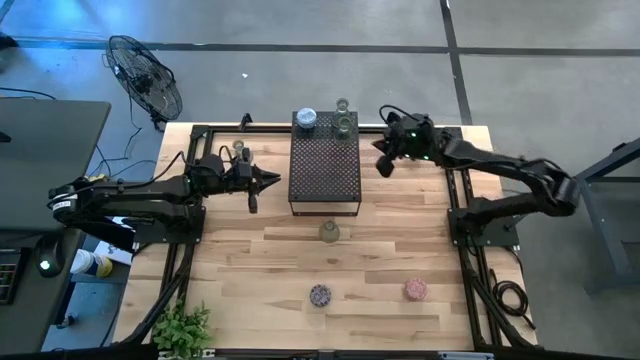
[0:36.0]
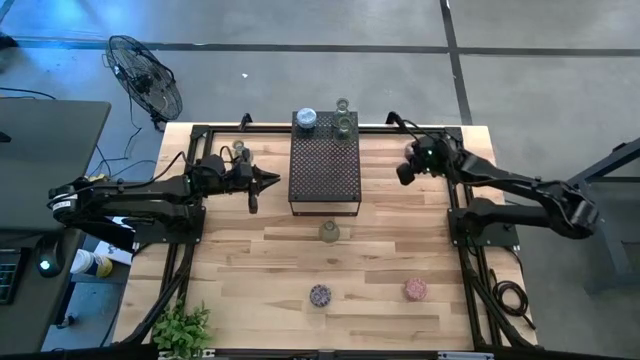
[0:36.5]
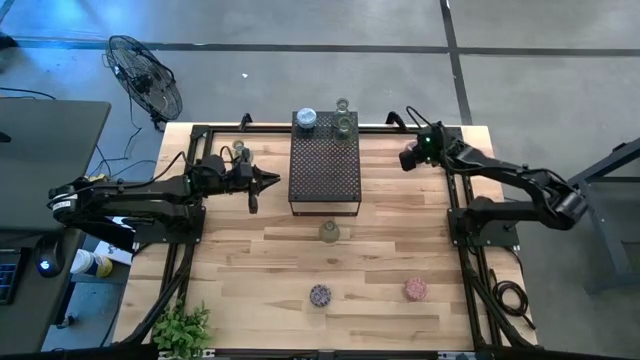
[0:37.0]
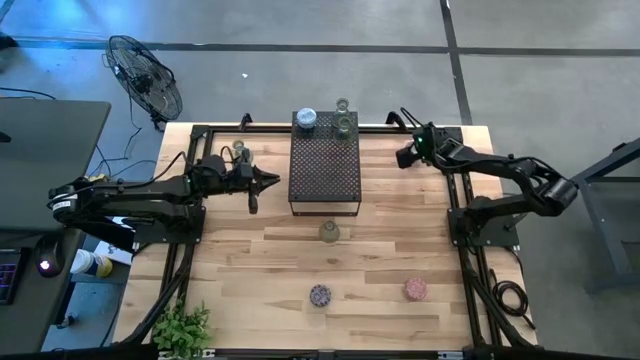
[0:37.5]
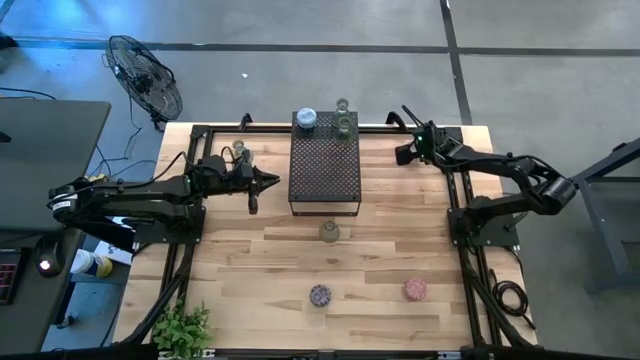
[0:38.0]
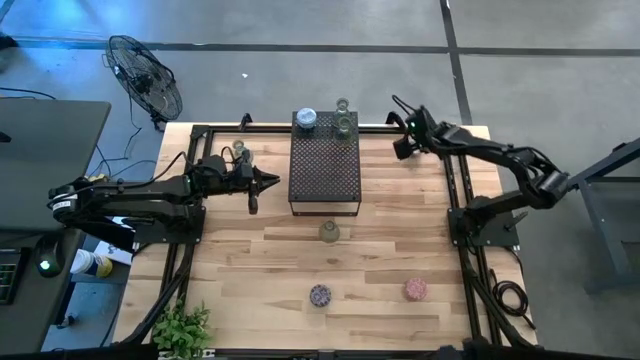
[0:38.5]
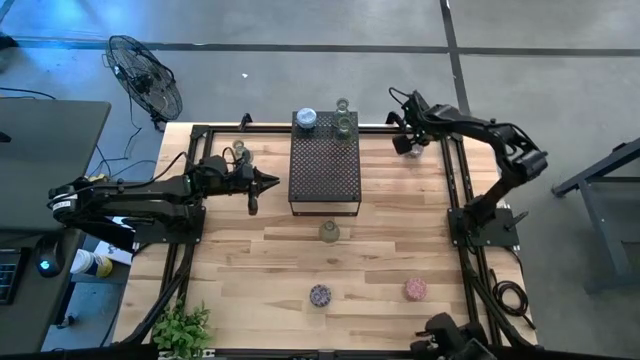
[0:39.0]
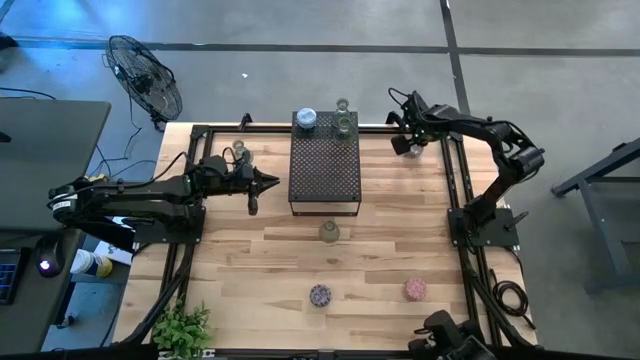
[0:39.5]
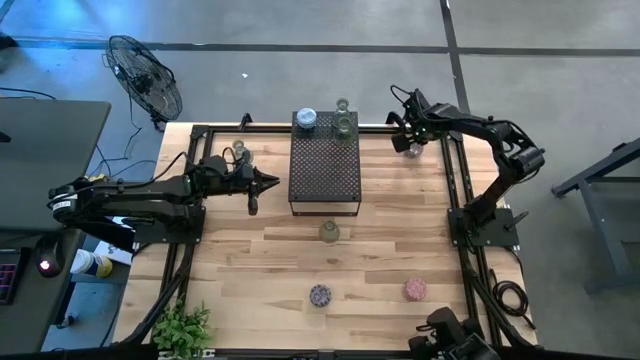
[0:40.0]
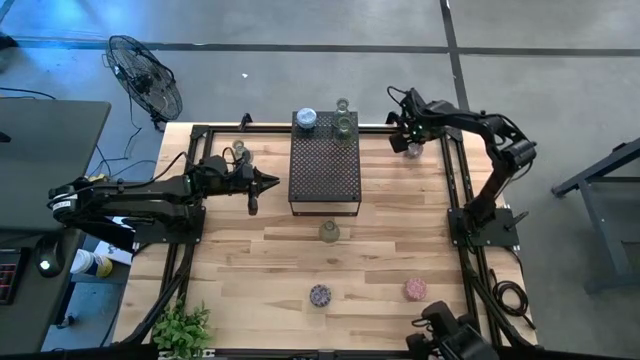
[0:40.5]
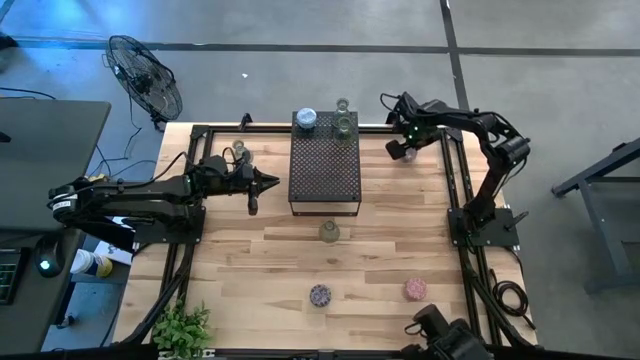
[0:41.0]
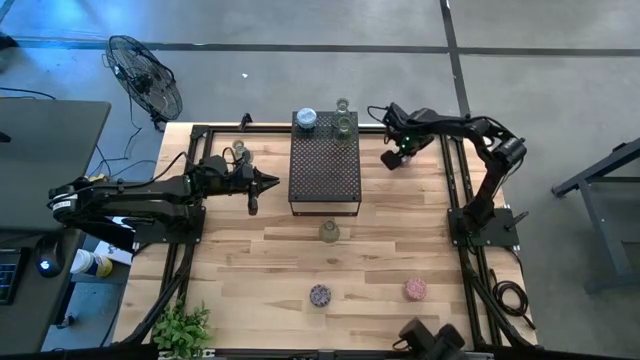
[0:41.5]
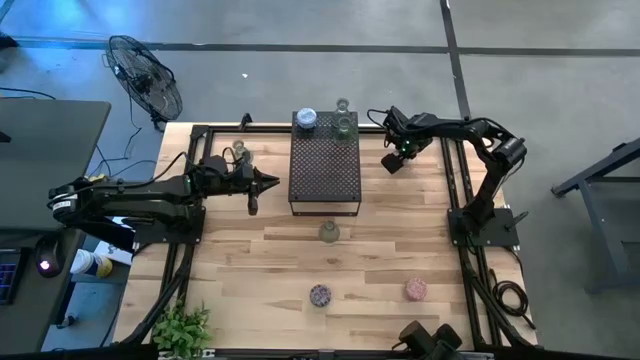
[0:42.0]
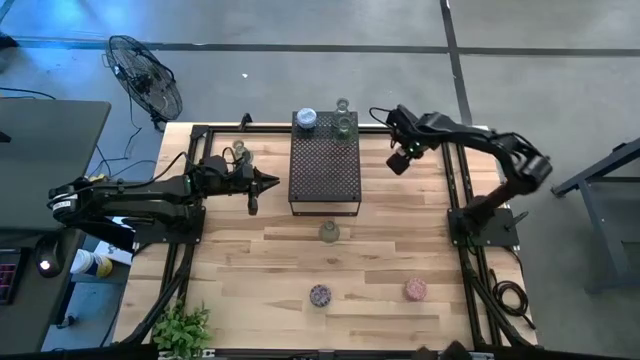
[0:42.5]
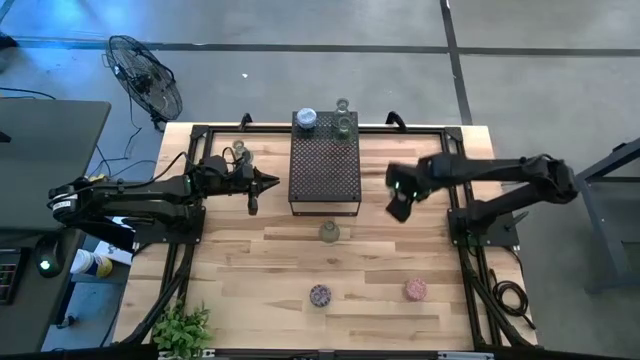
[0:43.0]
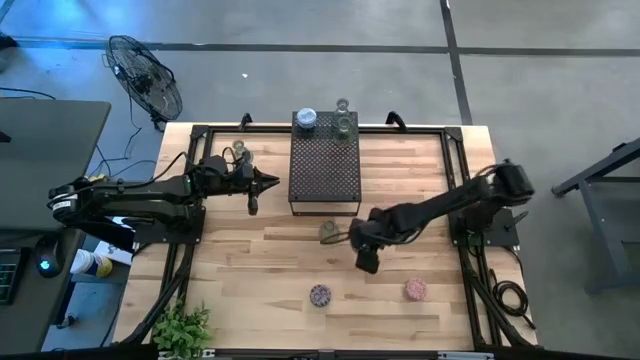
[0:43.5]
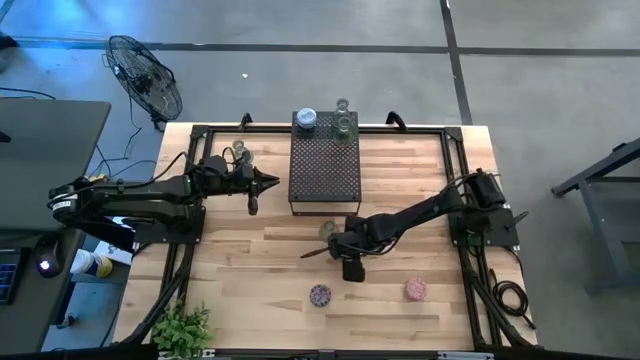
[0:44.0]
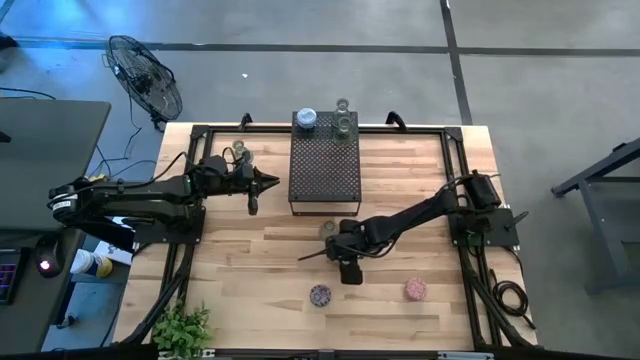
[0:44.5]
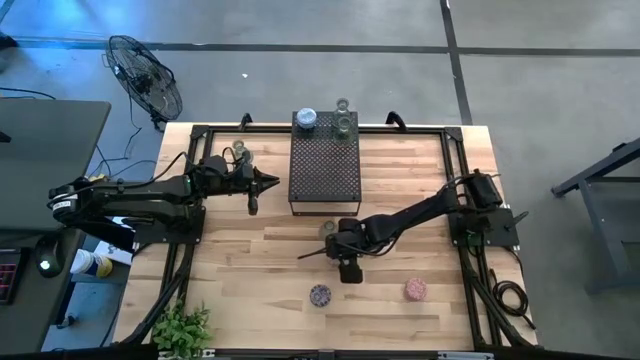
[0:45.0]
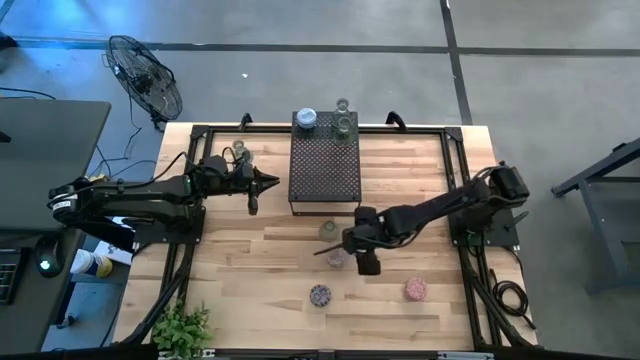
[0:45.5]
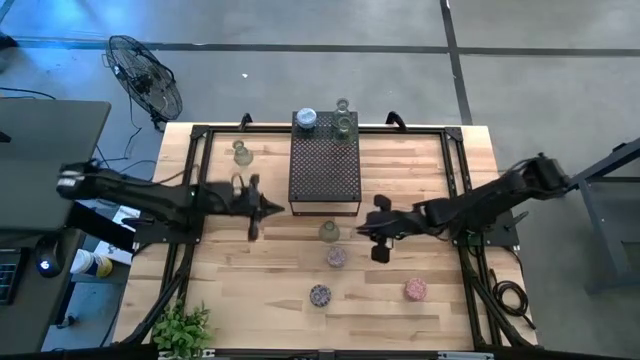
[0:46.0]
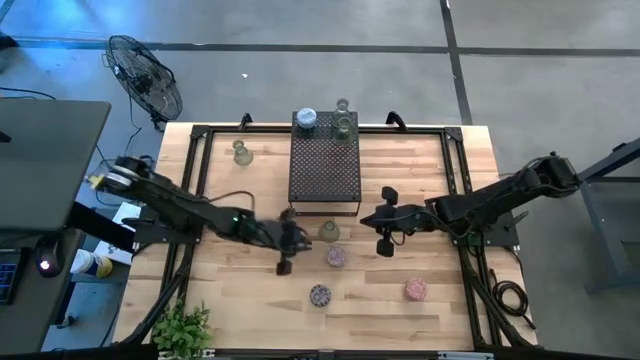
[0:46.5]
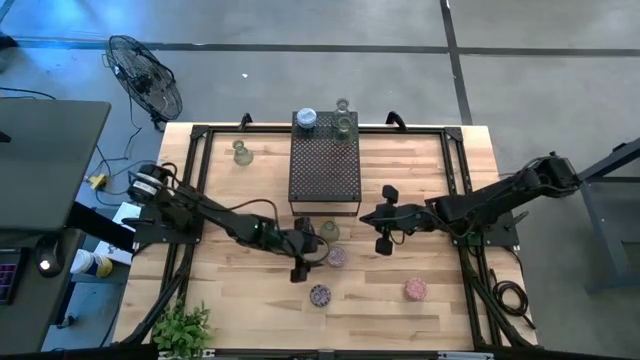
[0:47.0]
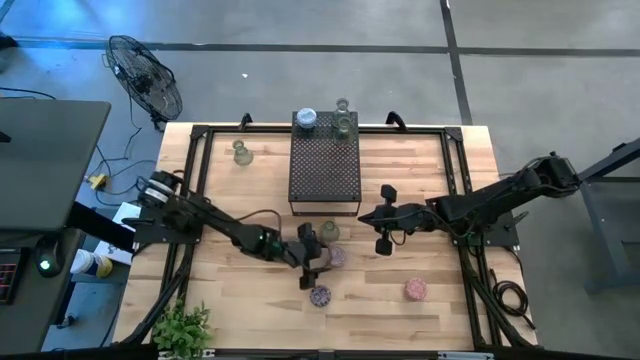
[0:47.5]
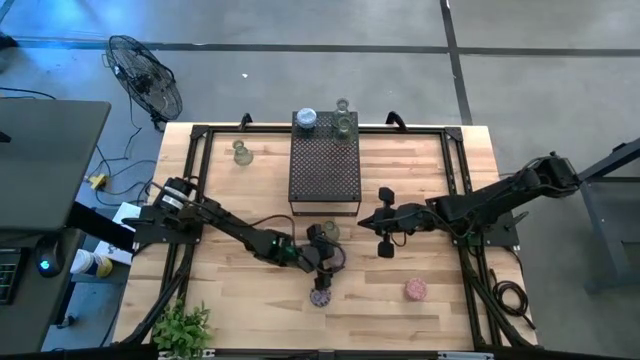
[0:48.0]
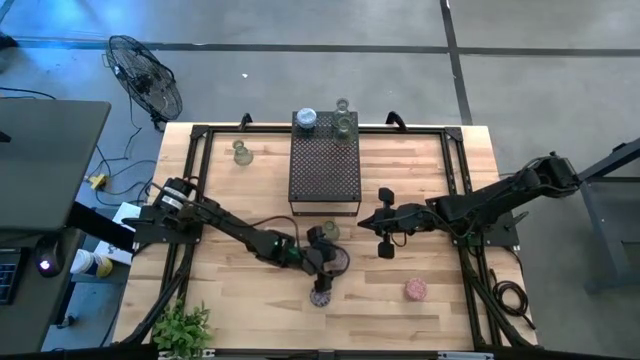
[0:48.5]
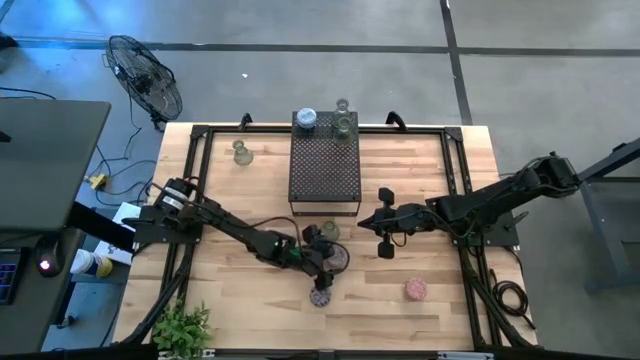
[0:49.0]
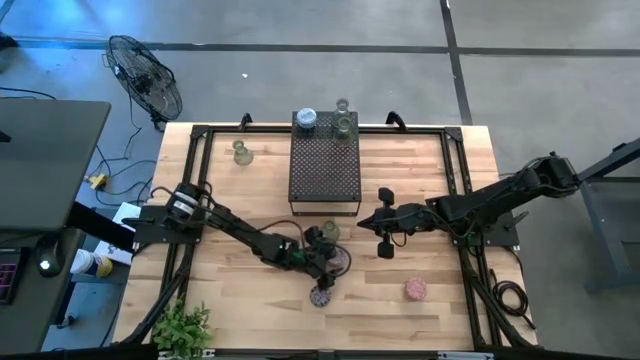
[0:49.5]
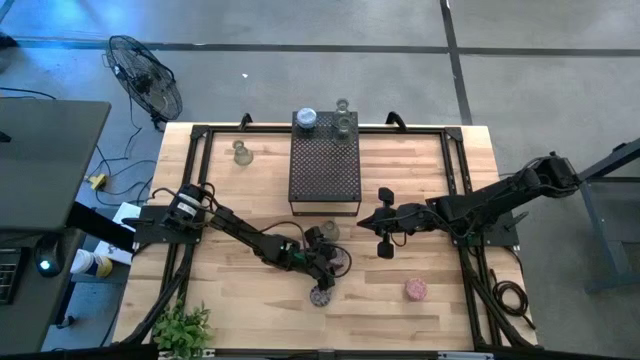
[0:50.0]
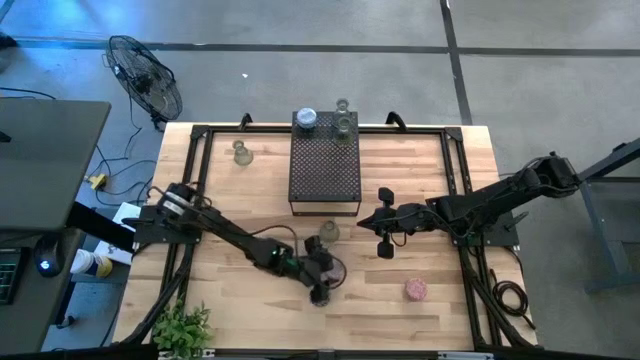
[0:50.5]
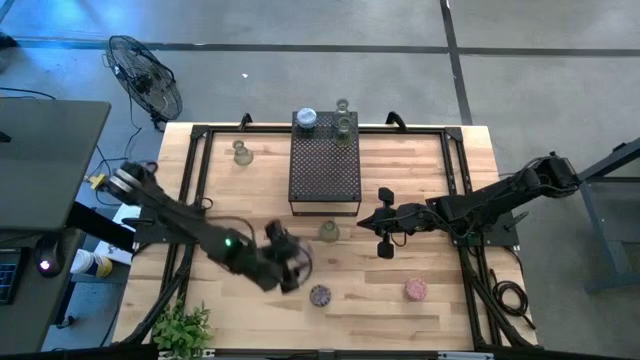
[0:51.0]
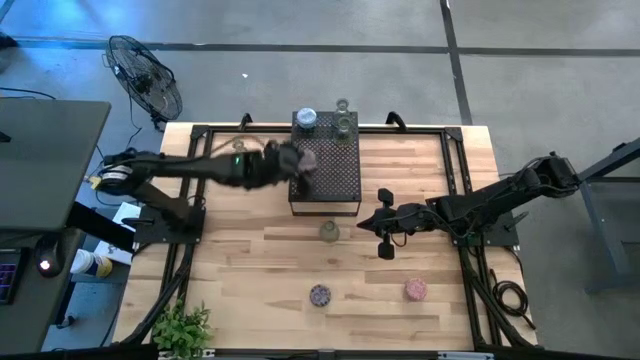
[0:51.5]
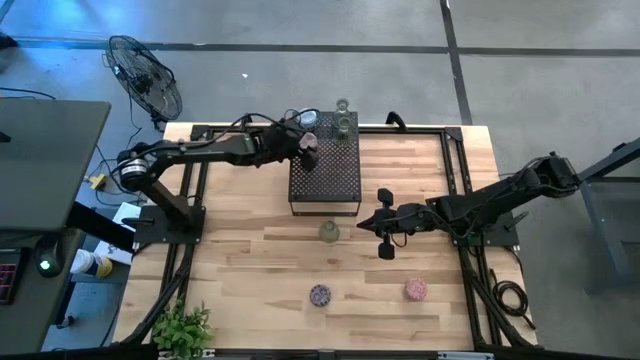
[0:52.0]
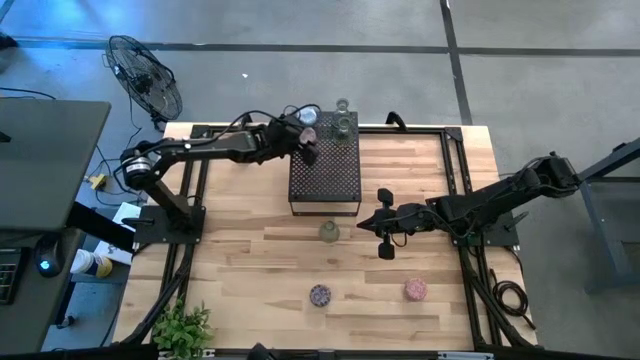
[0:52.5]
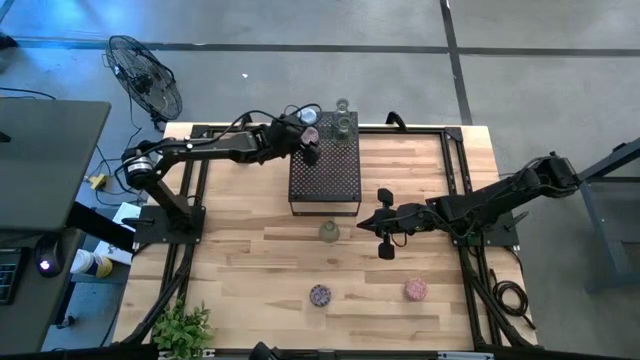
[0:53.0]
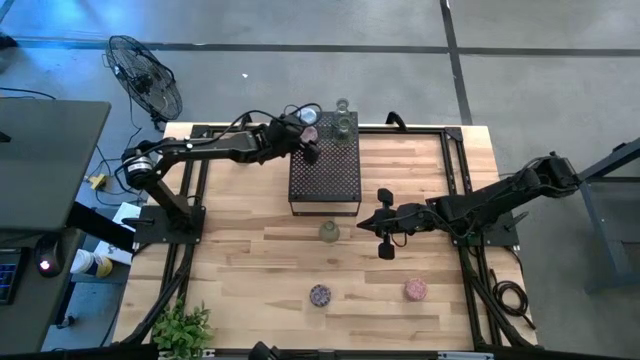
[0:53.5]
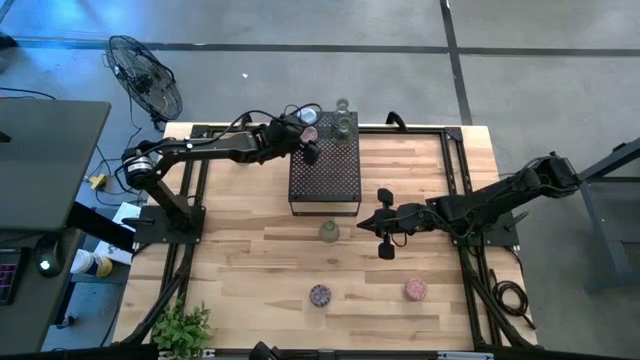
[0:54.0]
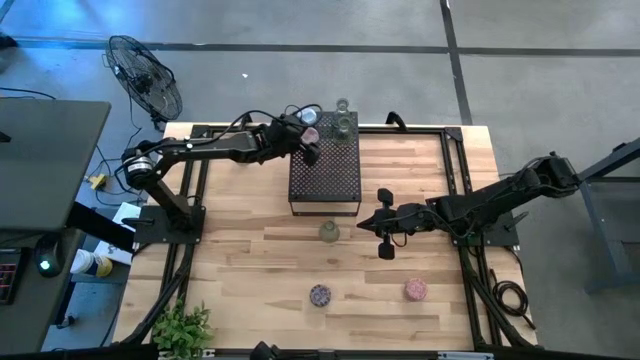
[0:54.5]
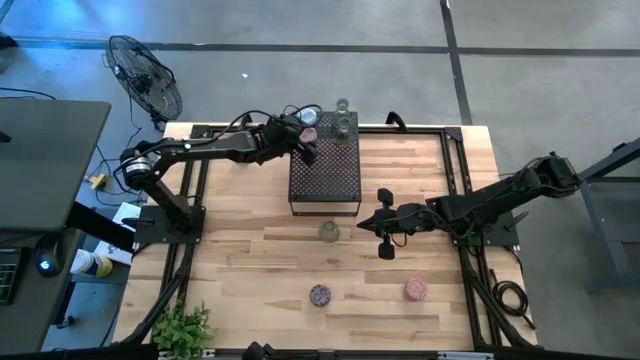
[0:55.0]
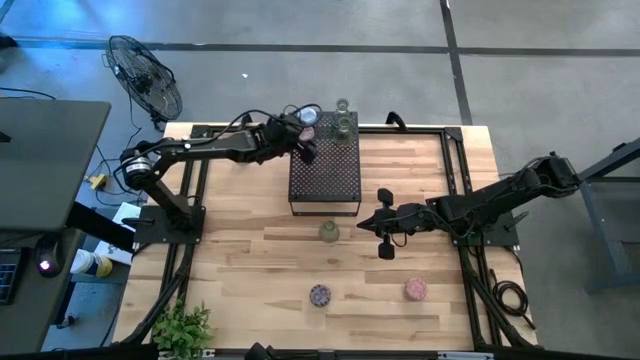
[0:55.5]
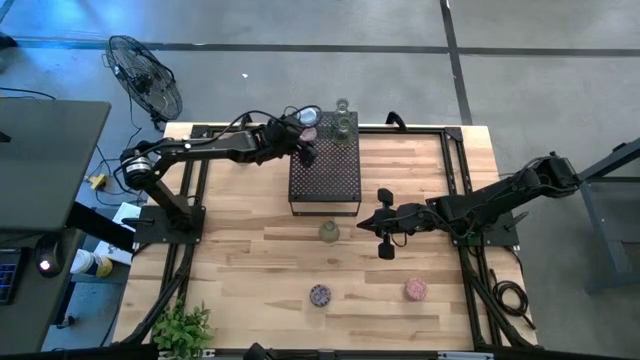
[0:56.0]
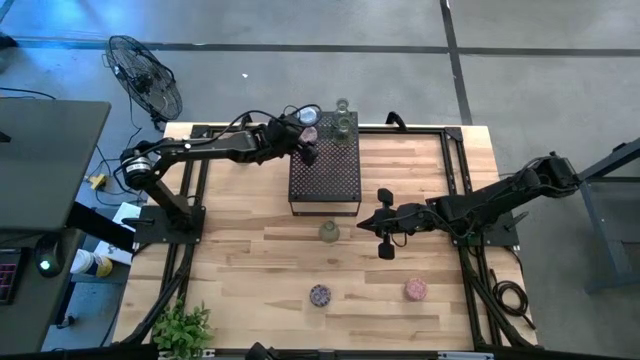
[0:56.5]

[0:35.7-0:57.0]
Task: Pick & Place candle stick holders
Put the red scented candle on the shelf aligned with the other blue scented candle
